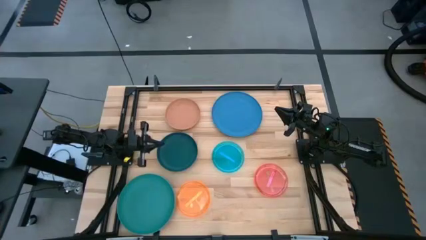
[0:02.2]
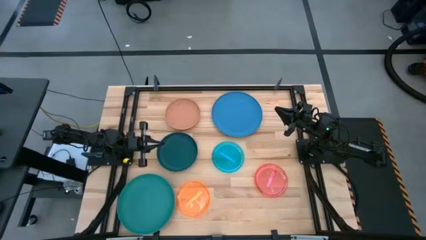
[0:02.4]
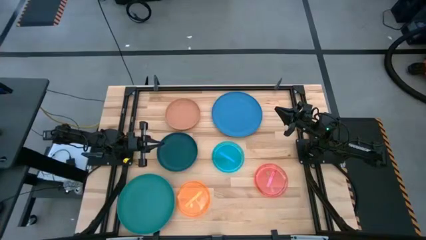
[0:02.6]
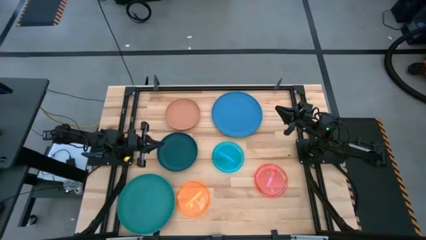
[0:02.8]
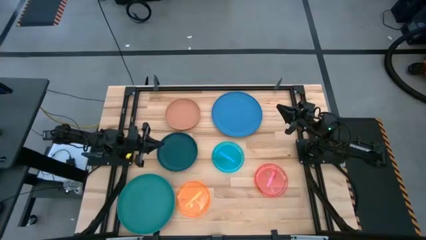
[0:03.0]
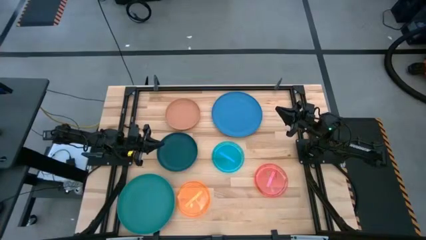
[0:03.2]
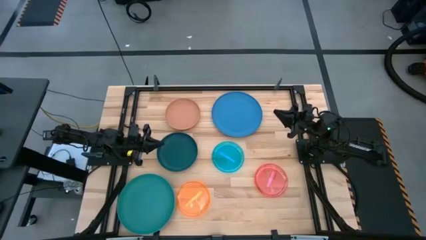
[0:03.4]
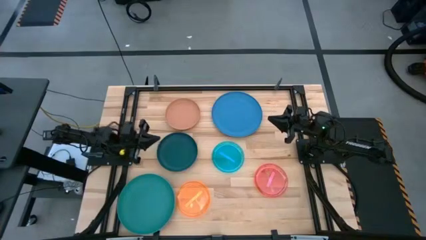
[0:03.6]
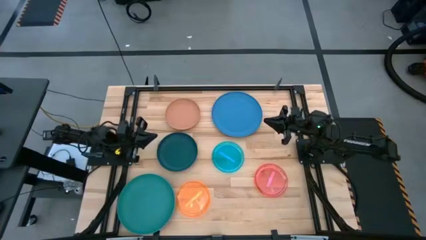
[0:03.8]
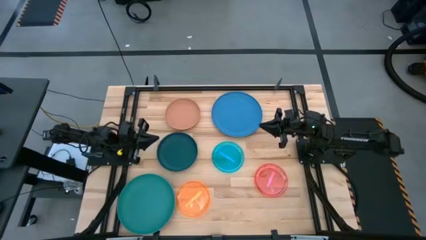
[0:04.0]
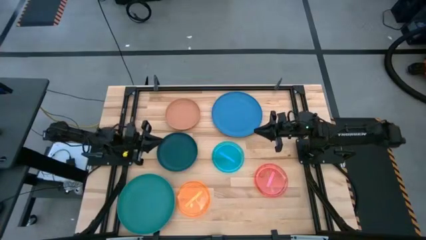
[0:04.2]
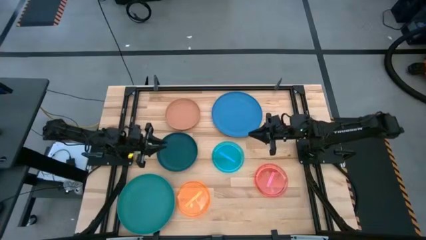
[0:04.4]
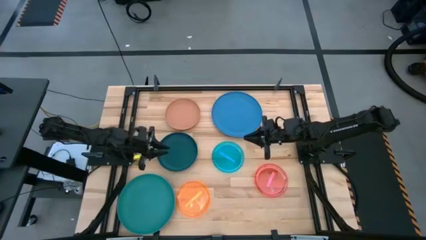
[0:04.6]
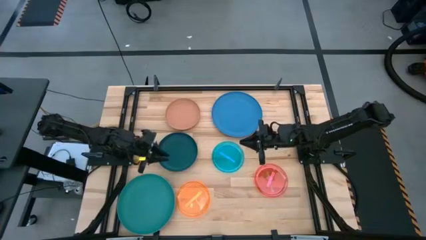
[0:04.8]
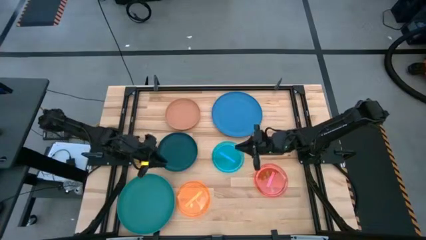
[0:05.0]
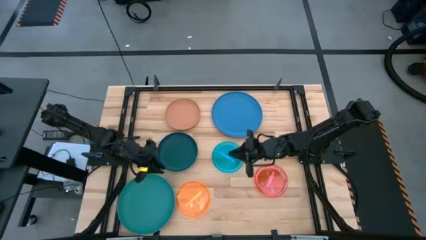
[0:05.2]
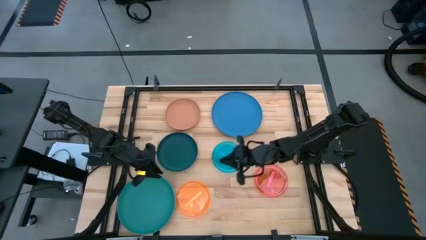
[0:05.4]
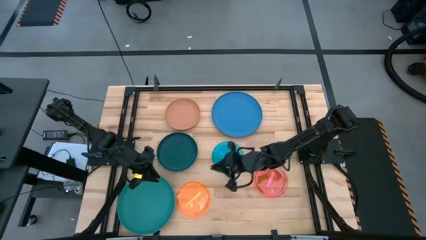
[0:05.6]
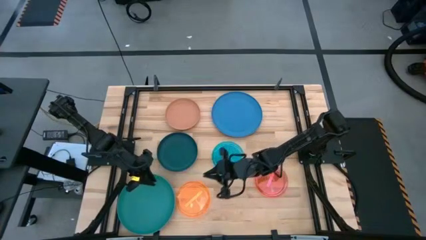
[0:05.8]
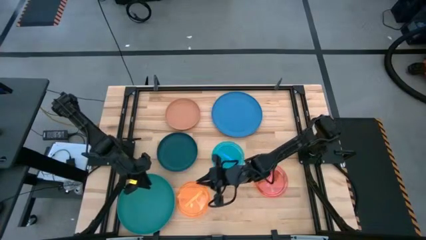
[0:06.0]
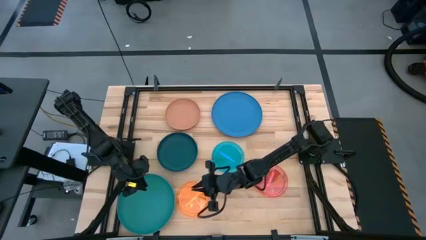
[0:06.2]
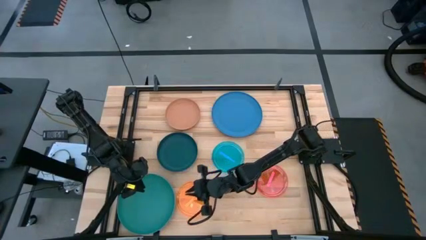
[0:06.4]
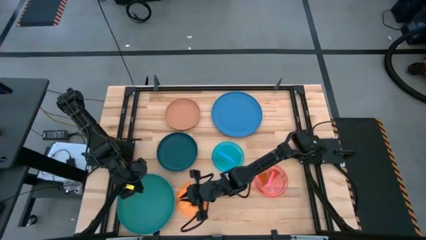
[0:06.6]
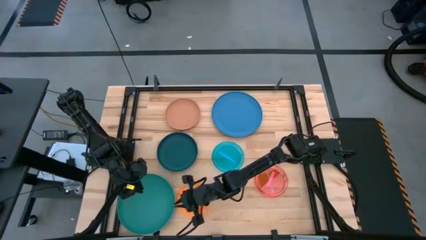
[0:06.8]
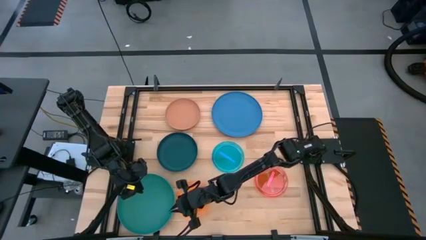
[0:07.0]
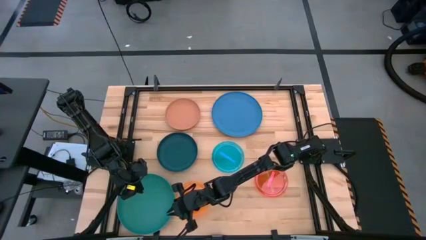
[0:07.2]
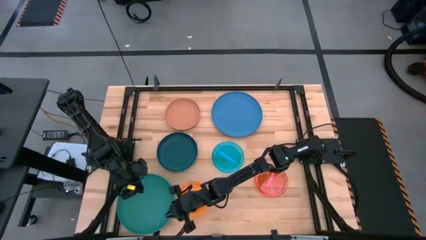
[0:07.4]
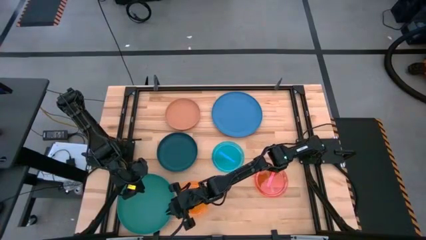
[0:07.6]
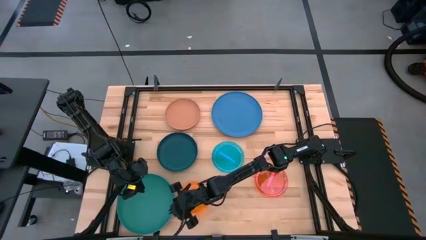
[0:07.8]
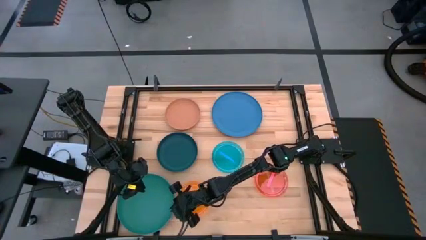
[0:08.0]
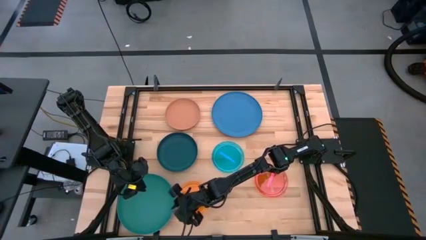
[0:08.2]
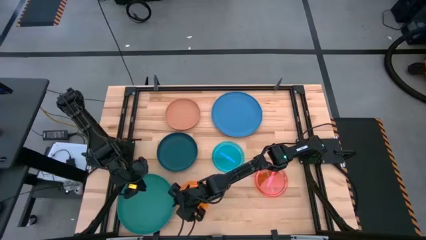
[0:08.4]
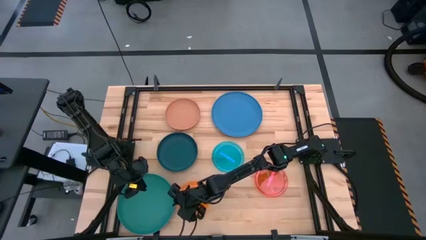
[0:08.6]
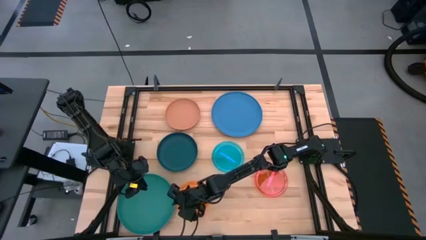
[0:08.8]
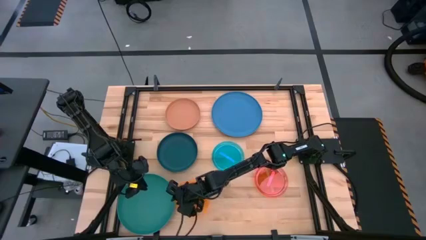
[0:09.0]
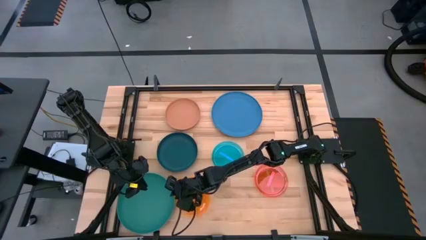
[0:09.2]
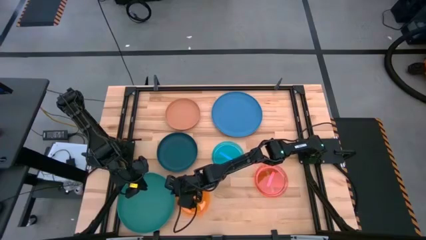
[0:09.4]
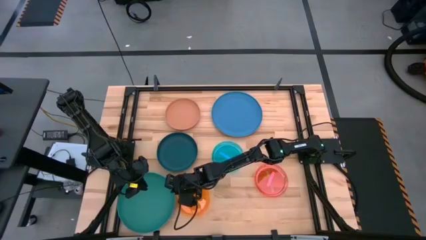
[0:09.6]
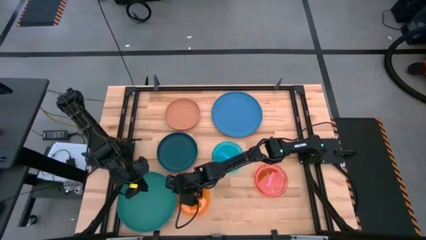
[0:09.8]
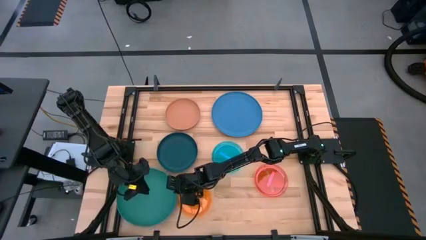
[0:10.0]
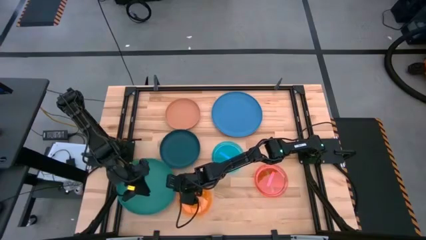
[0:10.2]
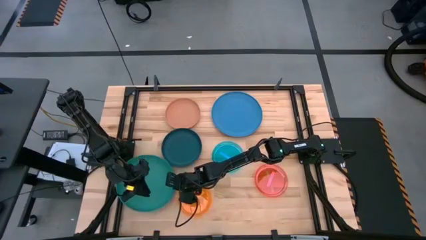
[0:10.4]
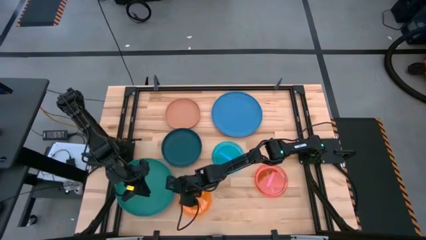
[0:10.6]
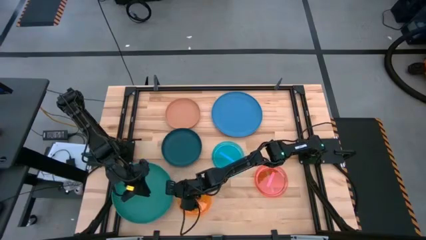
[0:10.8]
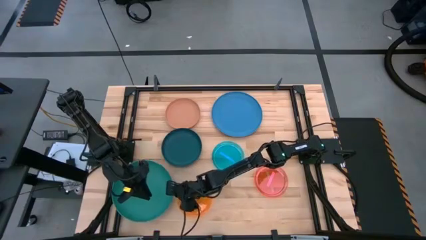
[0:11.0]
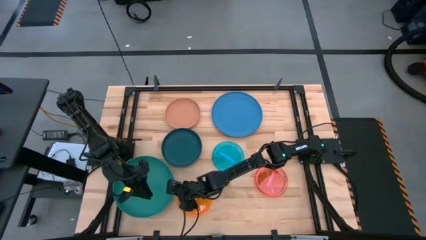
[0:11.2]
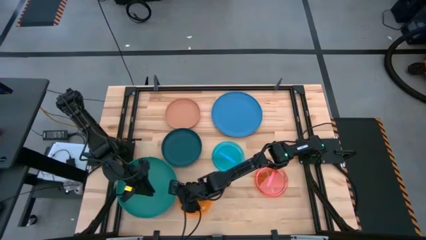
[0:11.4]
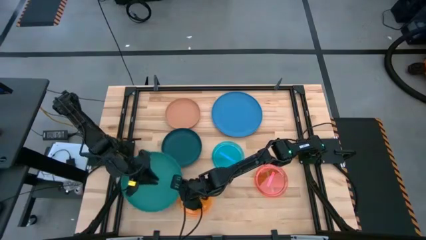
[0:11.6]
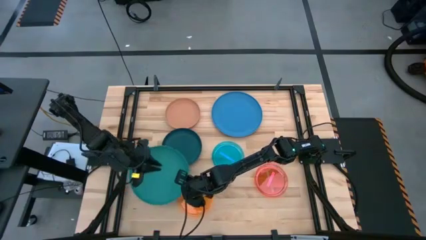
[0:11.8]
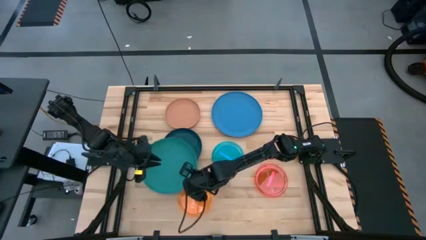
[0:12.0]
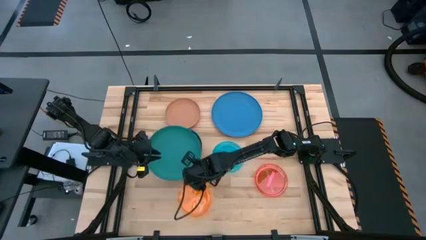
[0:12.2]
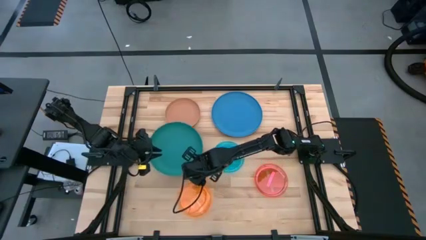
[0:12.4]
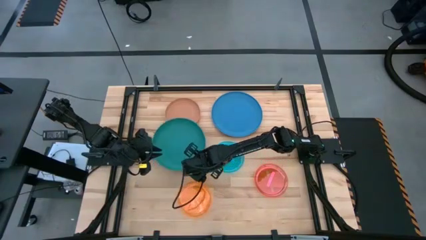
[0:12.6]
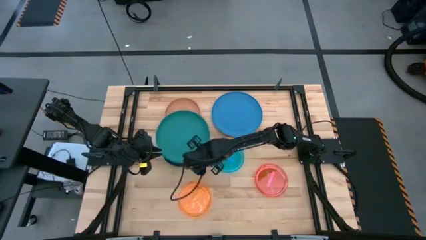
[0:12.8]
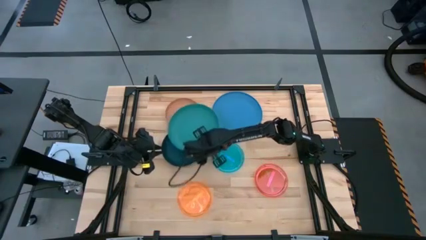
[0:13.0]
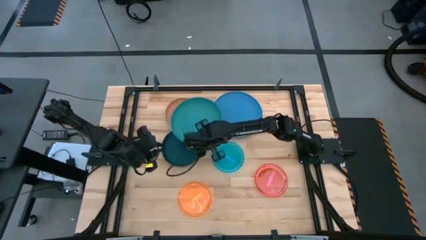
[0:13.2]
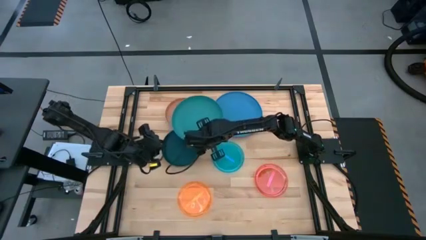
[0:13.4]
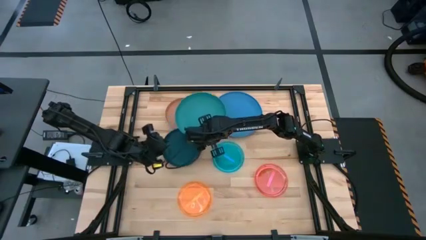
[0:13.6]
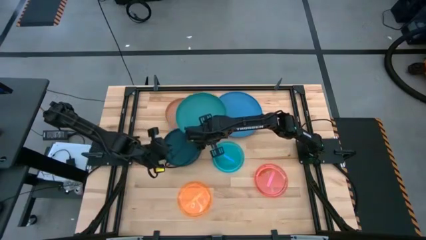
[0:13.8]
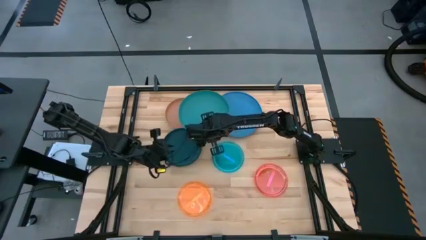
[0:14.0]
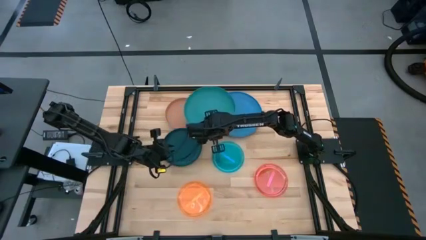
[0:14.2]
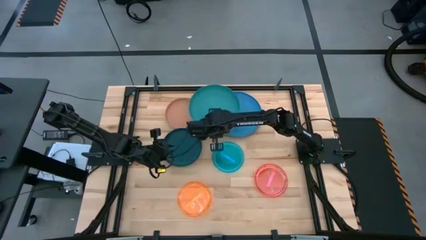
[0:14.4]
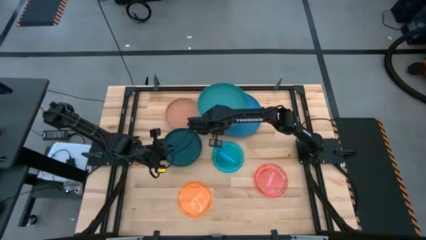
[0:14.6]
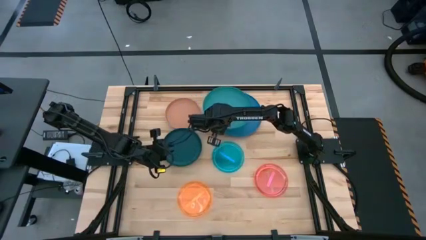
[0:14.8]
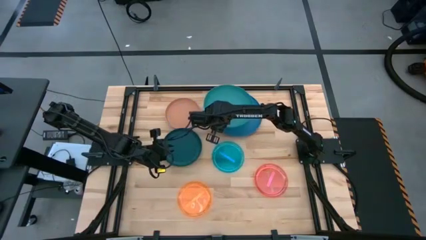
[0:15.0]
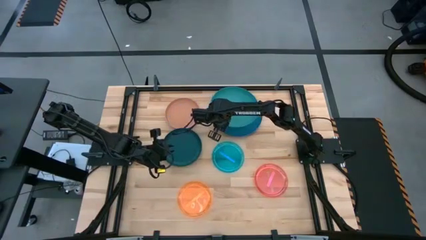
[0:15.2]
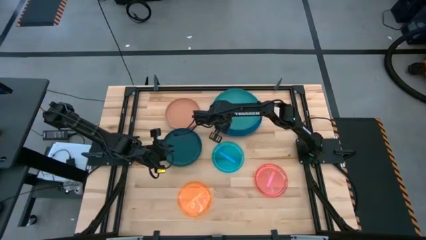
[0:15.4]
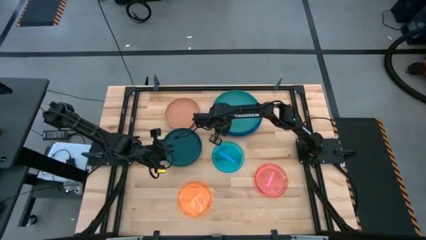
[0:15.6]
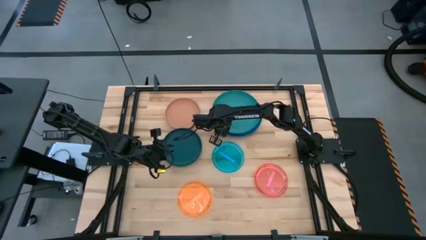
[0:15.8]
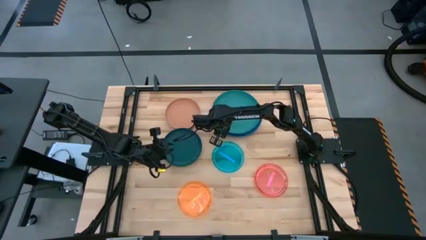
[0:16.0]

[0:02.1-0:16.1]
Task: Stack plastic plates
Stack the green plate on top of the blue plate
